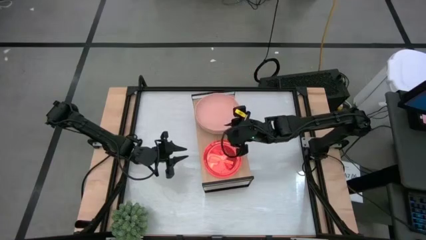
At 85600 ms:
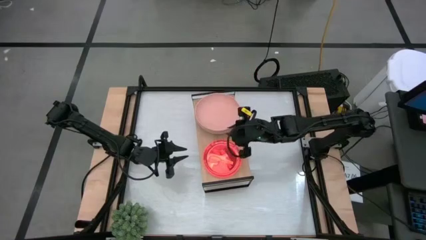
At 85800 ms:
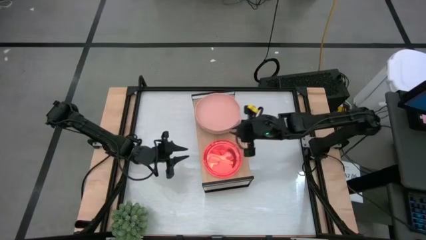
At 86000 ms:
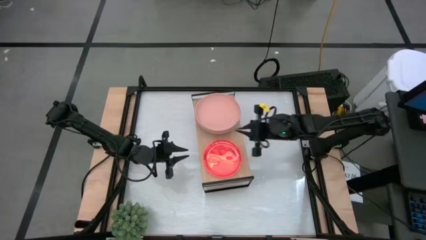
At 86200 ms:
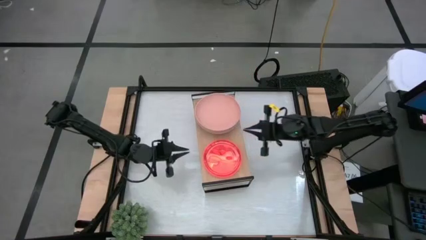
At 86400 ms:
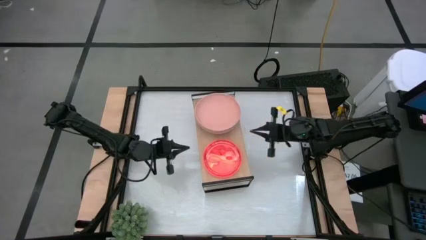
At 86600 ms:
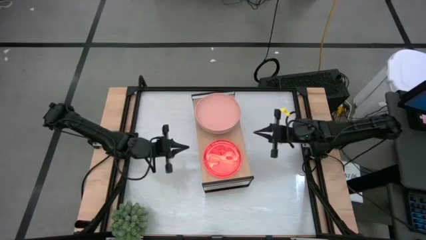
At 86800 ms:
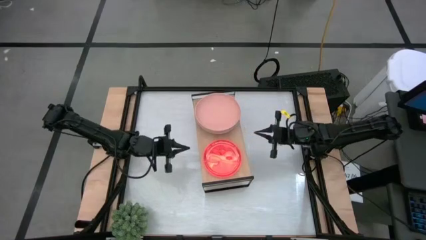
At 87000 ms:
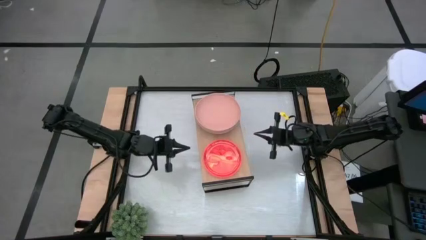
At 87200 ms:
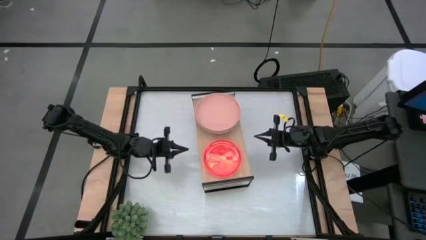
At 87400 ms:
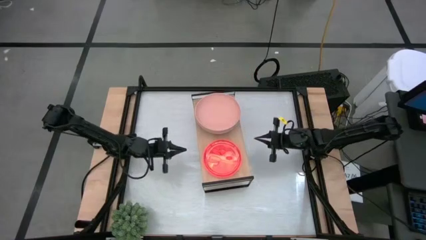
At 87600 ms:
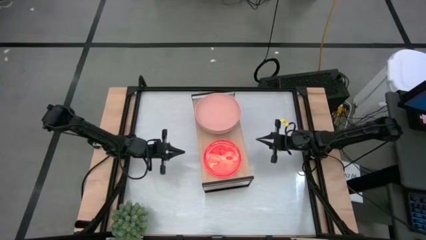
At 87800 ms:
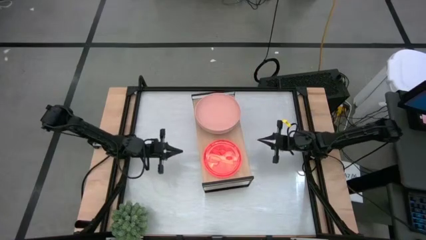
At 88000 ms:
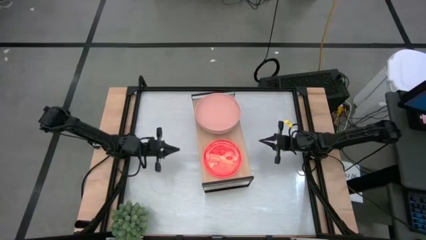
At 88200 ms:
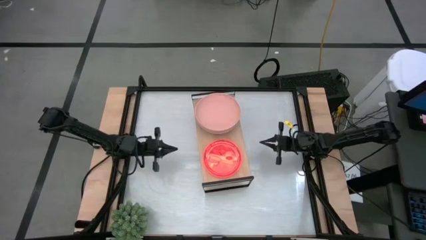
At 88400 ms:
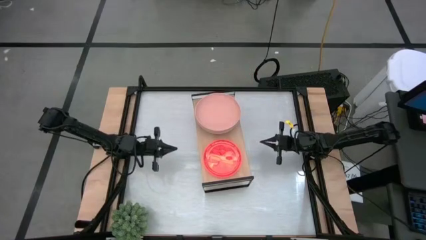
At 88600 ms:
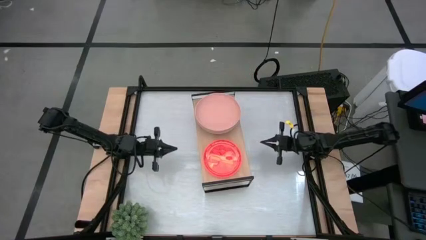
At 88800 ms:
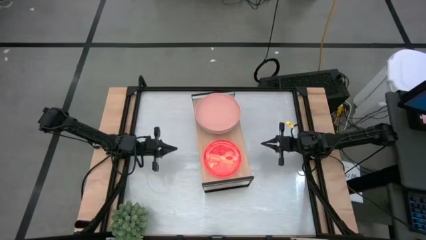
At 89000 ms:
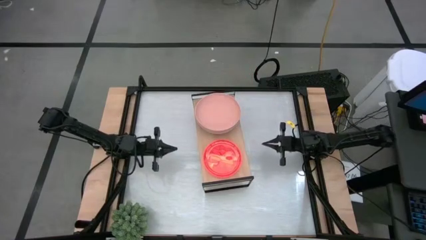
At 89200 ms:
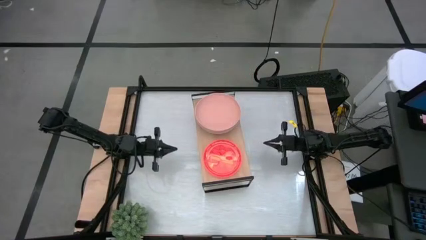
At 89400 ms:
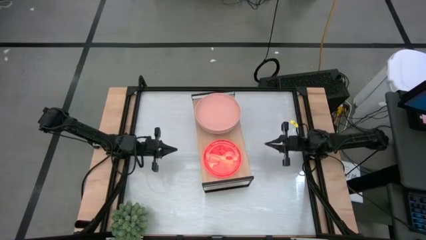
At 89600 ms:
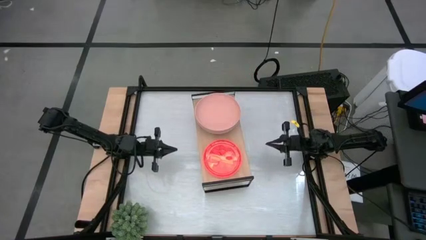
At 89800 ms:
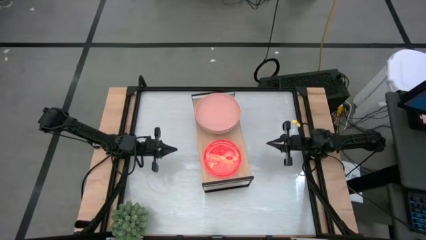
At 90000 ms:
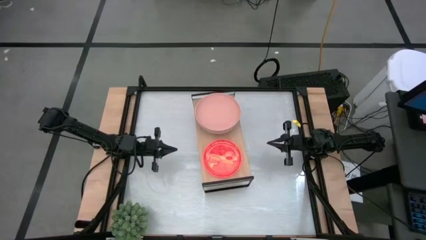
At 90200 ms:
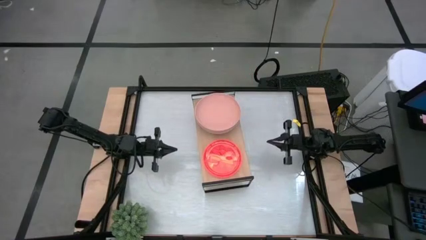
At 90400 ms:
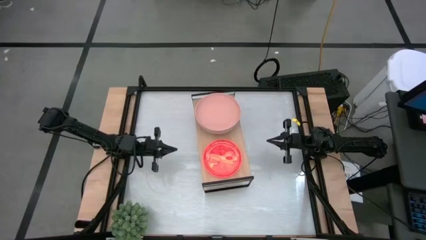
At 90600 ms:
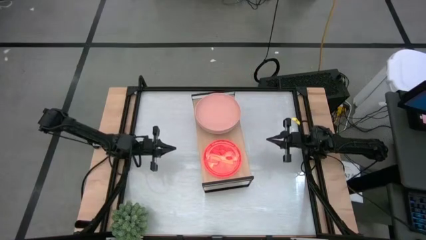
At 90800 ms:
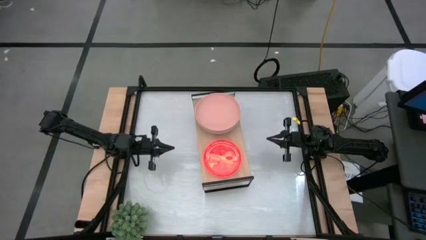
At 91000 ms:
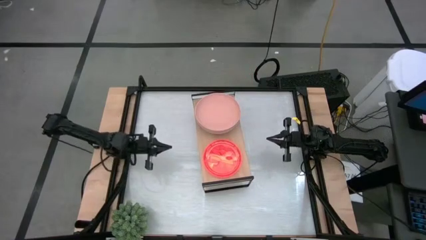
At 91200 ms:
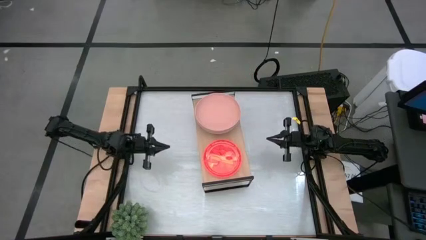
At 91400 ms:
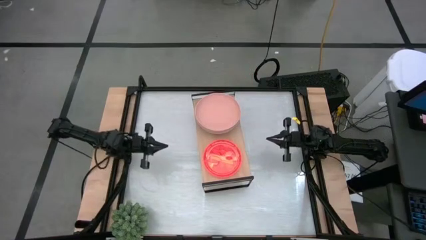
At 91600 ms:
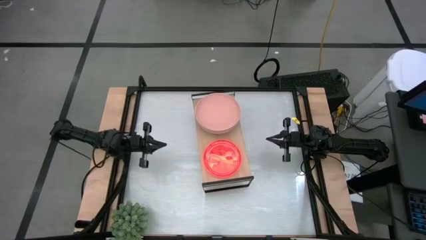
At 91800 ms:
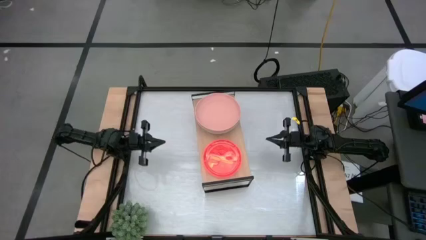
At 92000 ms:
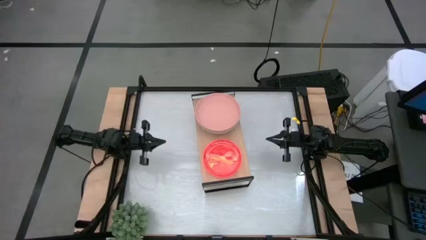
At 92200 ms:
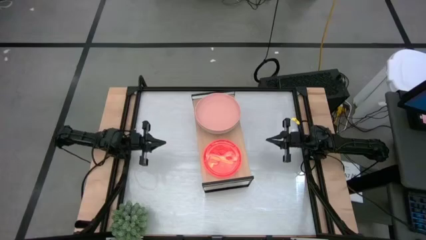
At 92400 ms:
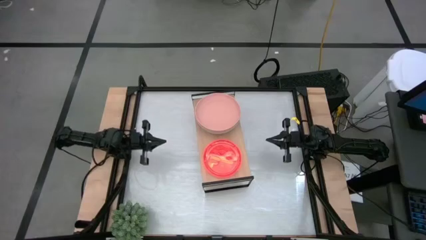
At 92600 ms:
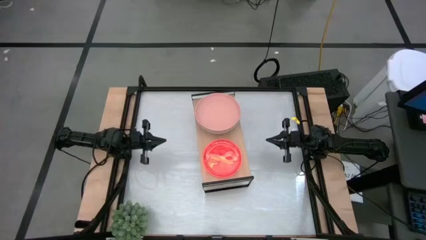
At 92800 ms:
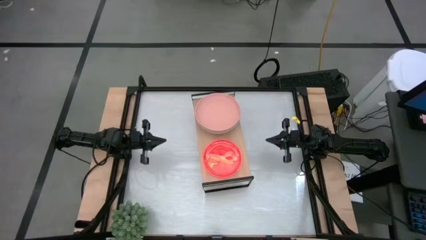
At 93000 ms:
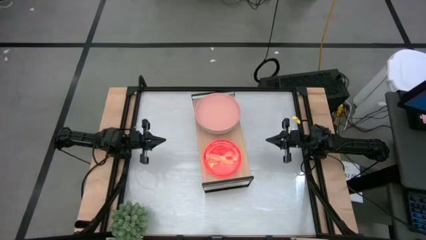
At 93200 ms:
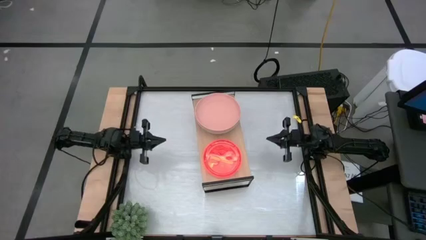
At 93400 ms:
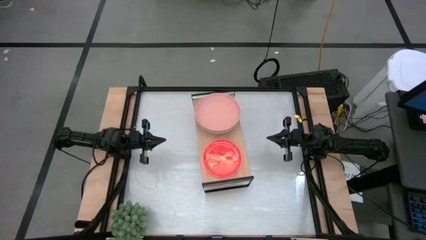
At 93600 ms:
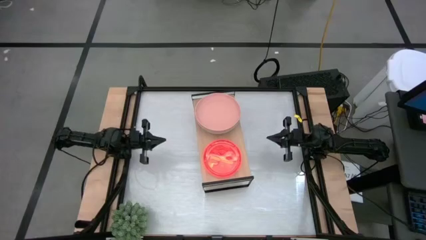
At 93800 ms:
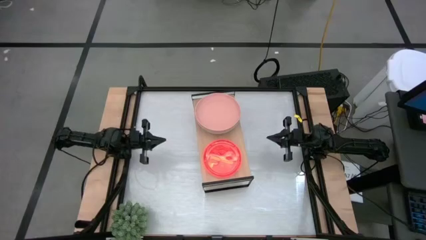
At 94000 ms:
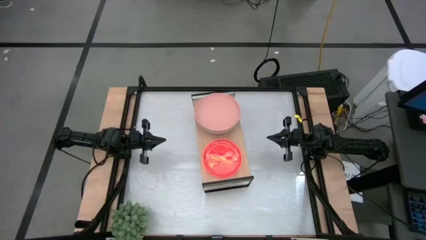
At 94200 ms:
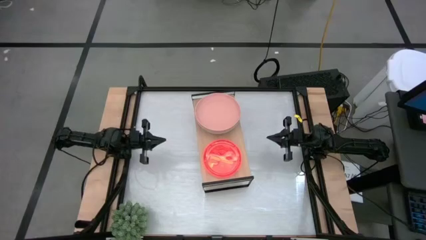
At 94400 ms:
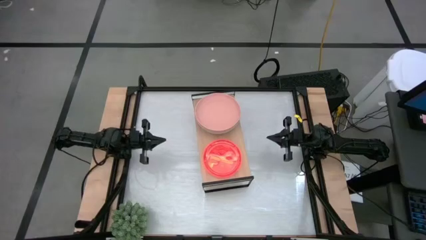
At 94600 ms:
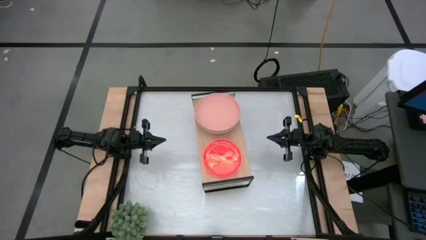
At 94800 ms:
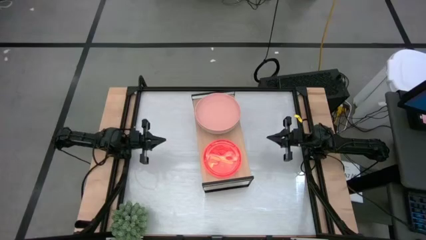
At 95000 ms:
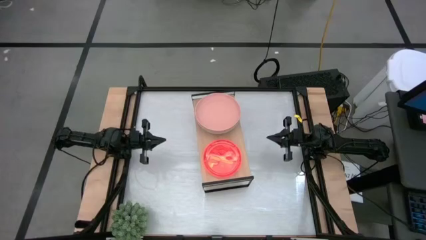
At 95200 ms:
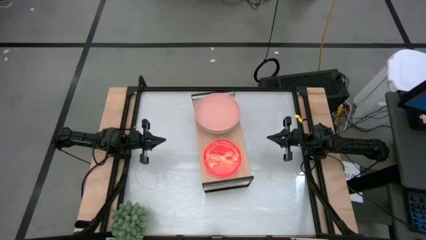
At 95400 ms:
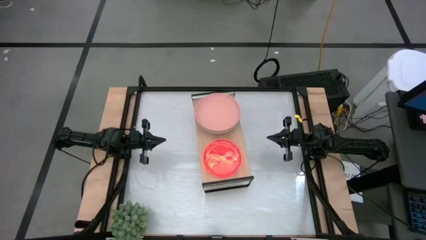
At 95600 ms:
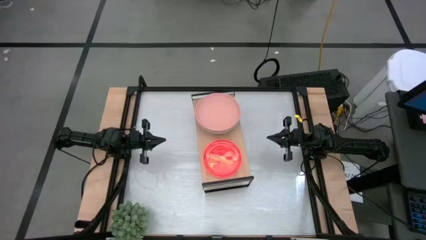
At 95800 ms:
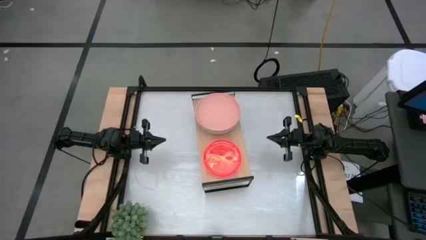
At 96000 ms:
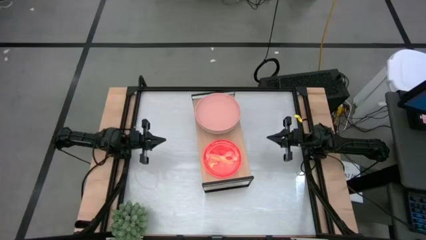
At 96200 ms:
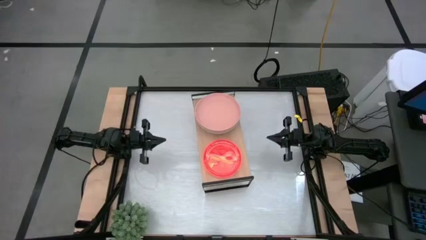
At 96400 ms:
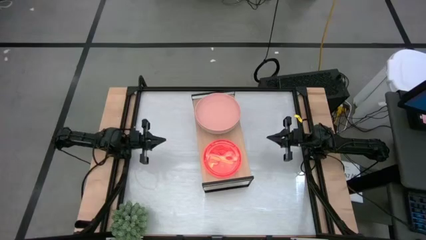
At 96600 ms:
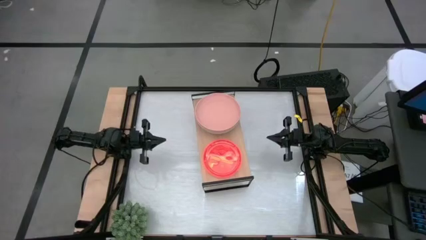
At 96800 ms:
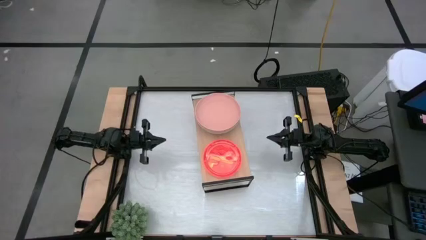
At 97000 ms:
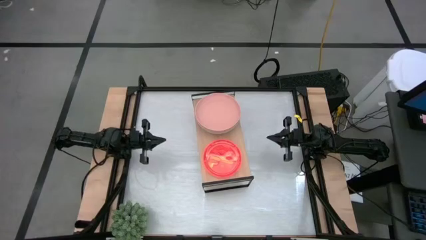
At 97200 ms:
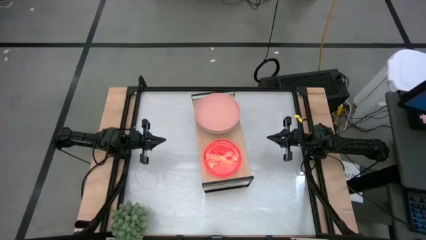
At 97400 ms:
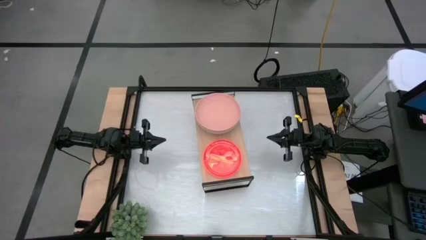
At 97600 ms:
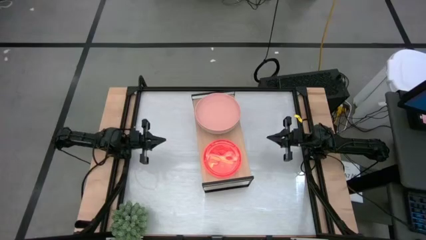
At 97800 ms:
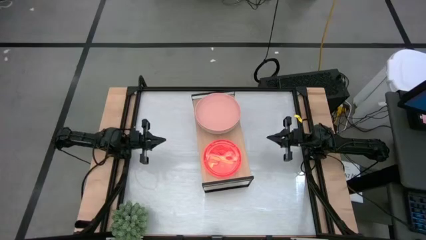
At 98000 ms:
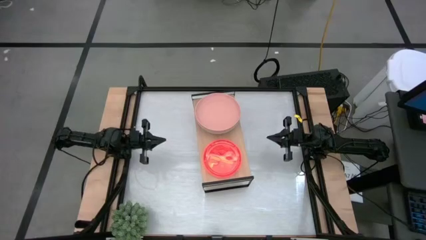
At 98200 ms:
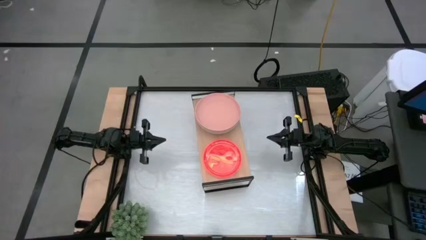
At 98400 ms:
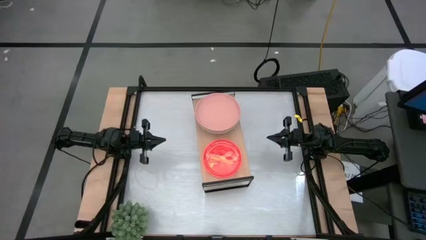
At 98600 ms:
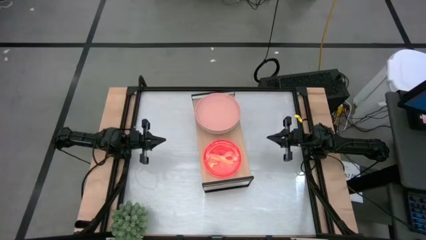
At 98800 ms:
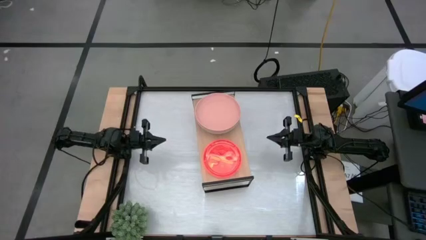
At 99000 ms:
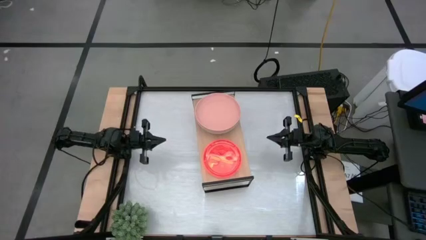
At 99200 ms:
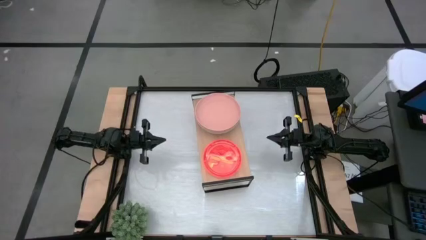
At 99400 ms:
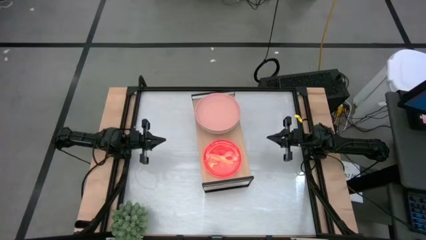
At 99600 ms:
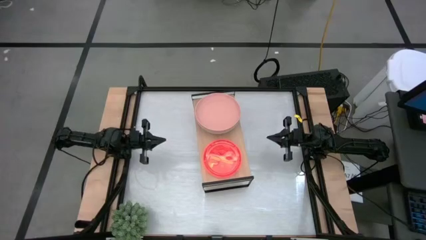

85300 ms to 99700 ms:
Task: Place and stack plates onto a shelf
Return to Home Position

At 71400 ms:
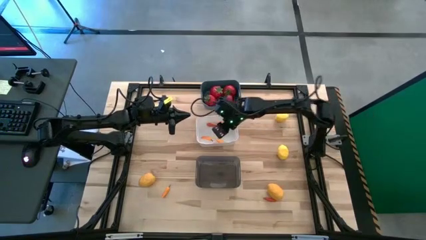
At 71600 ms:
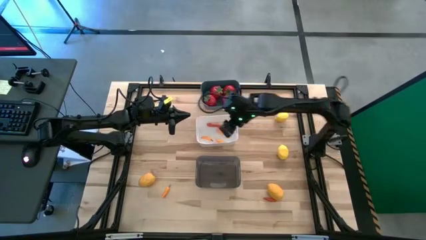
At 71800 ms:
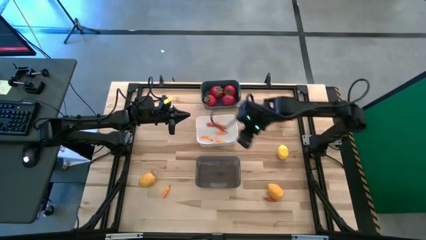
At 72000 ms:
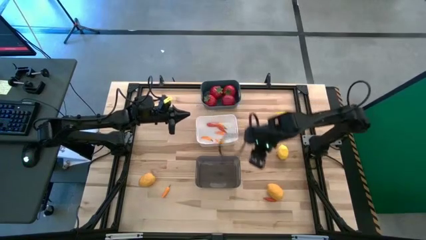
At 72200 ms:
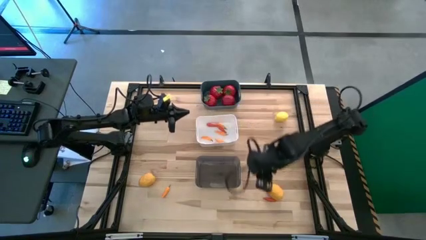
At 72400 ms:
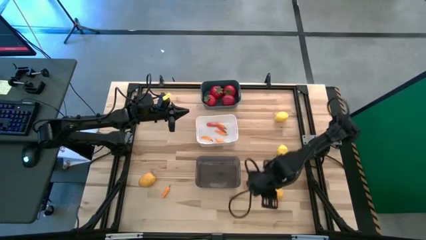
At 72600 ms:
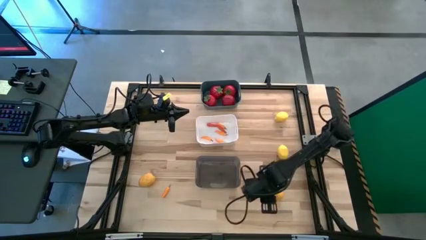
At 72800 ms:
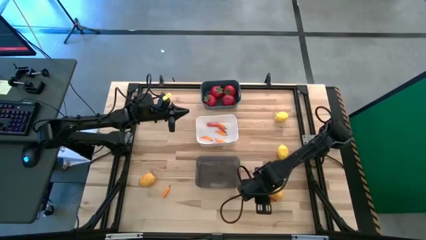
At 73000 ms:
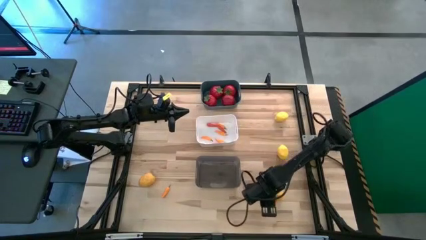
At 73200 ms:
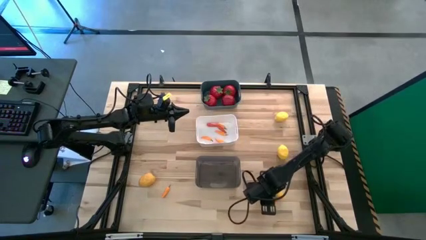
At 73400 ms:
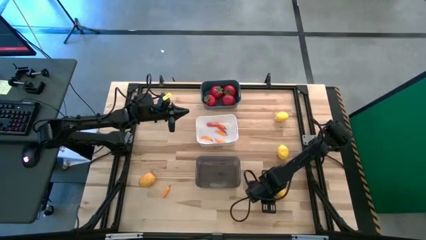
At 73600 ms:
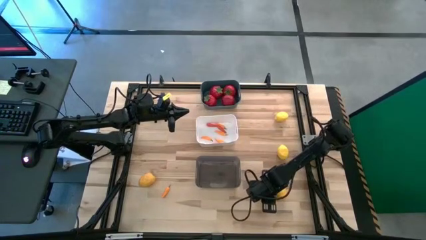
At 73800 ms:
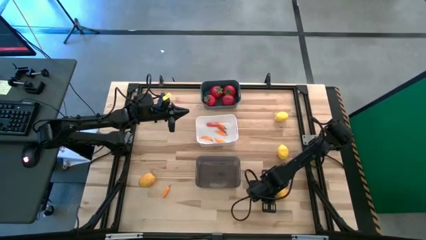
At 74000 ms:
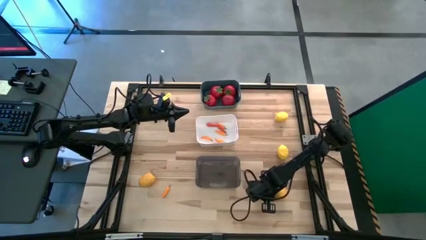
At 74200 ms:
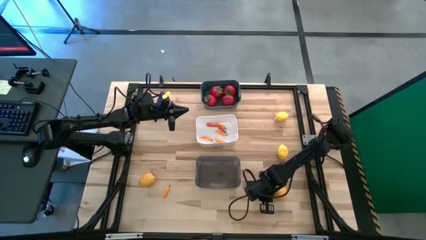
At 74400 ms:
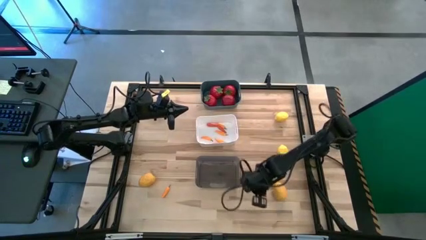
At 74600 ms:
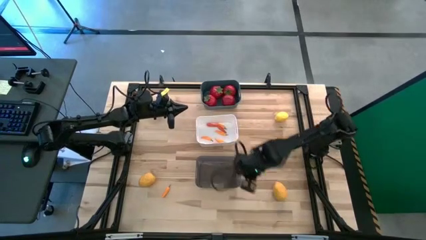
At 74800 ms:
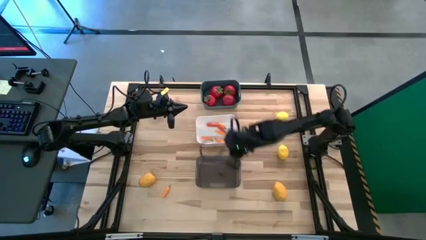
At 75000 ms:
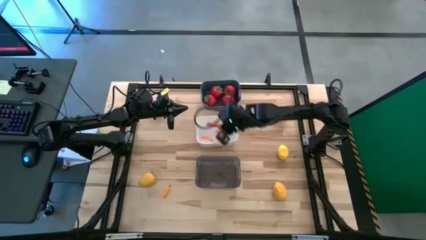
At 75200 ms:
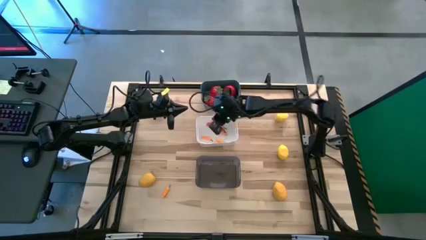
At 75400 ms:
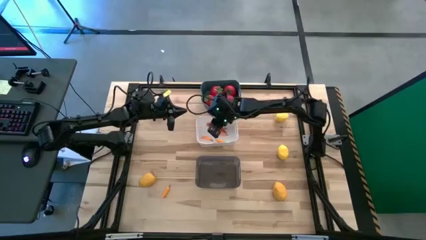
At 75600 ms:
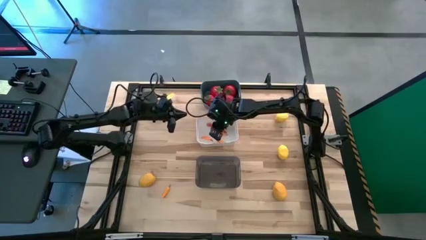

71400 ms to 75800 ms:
Task: Sort produce into baskets
Put the red chili pepper into the white bin
